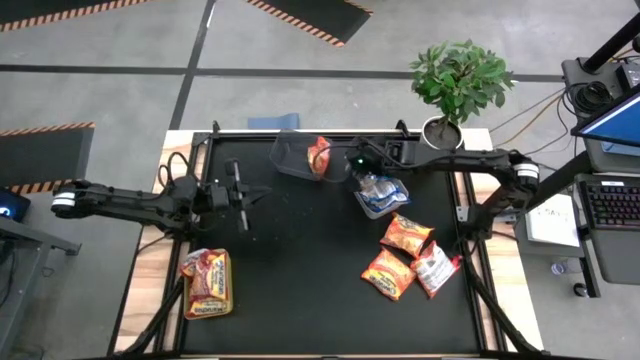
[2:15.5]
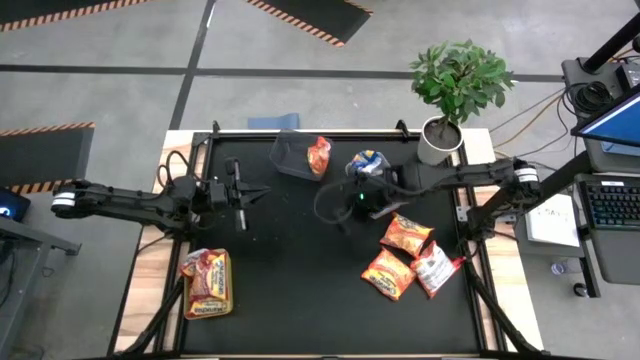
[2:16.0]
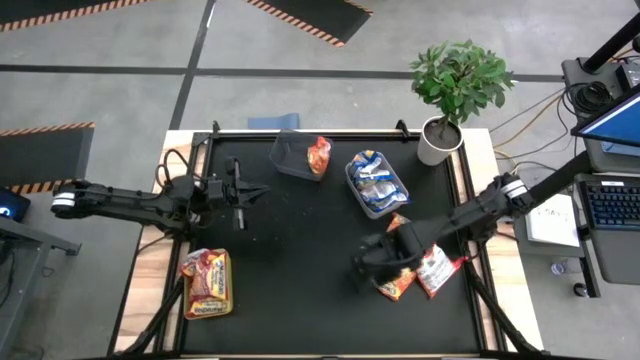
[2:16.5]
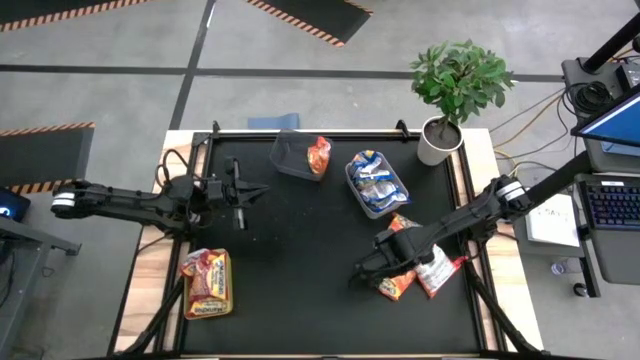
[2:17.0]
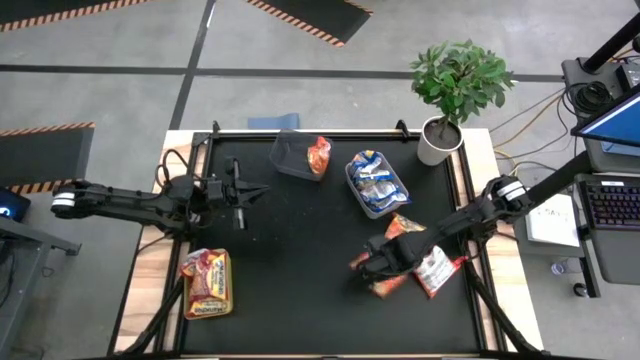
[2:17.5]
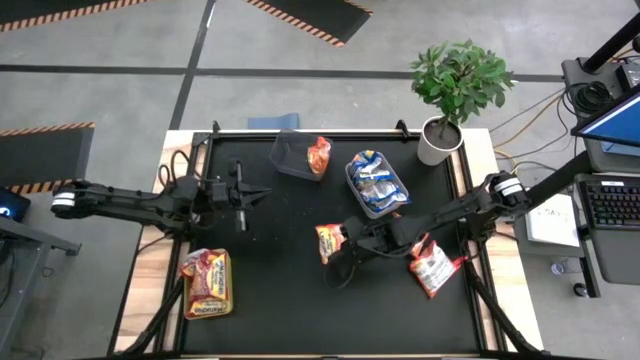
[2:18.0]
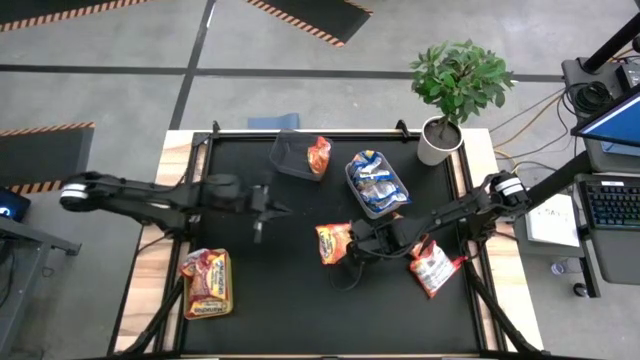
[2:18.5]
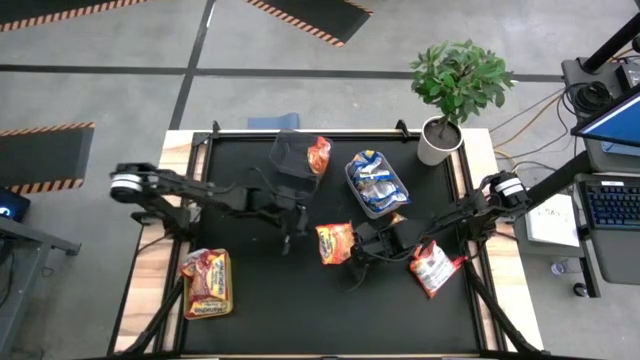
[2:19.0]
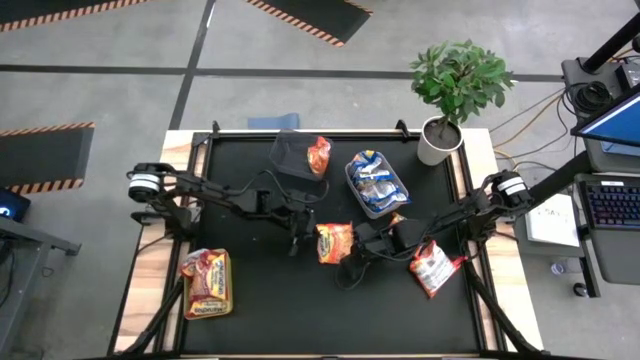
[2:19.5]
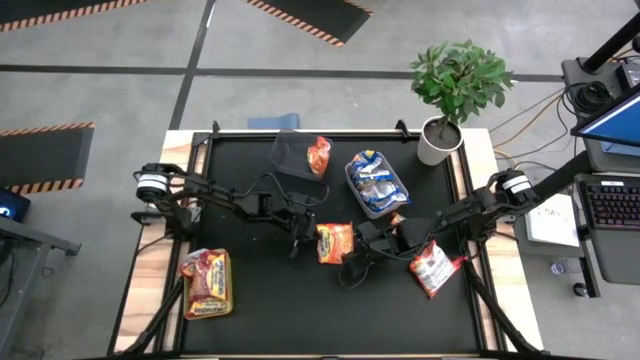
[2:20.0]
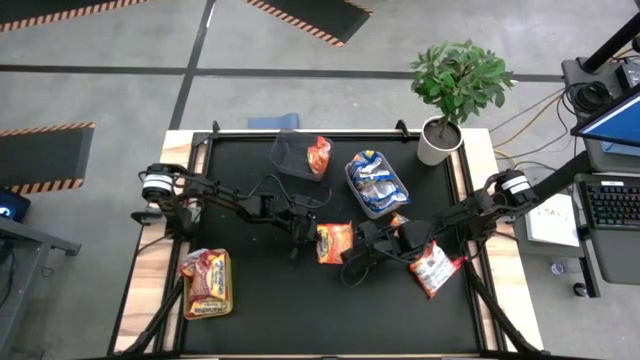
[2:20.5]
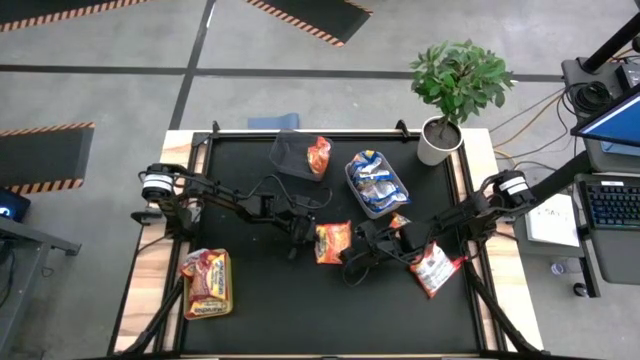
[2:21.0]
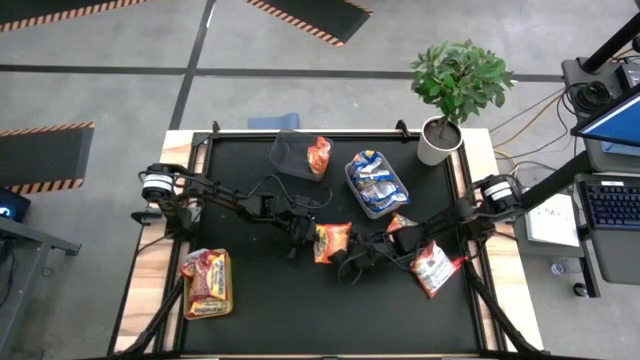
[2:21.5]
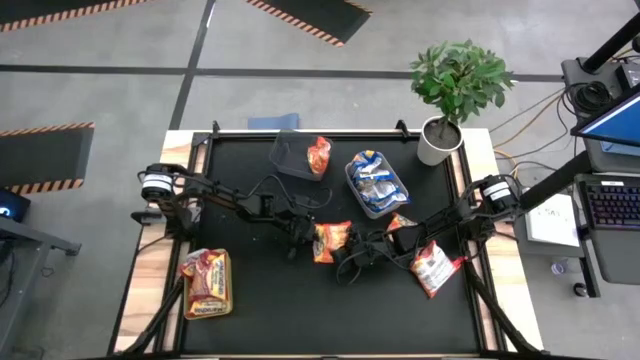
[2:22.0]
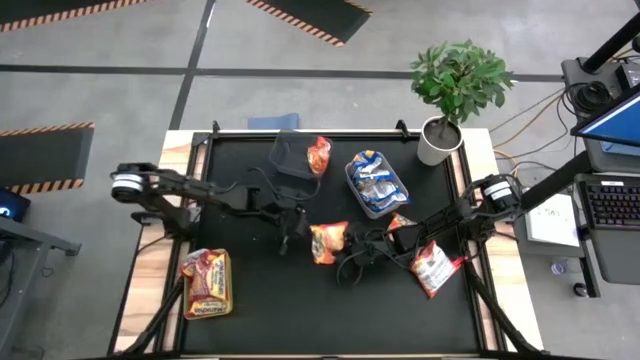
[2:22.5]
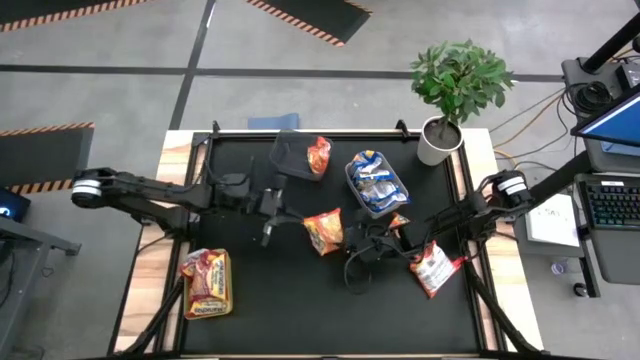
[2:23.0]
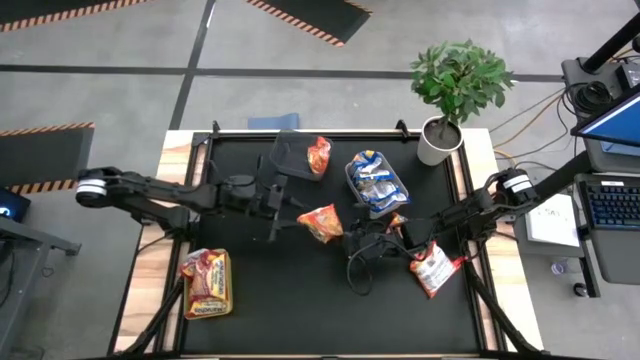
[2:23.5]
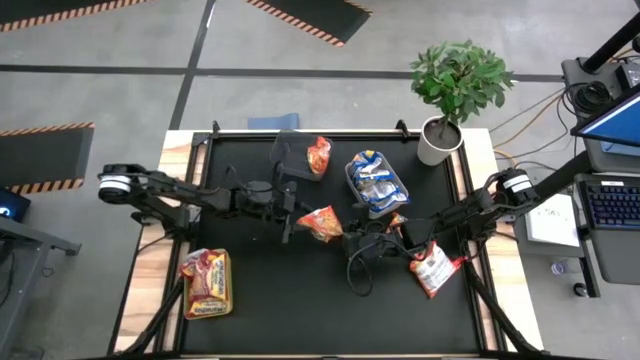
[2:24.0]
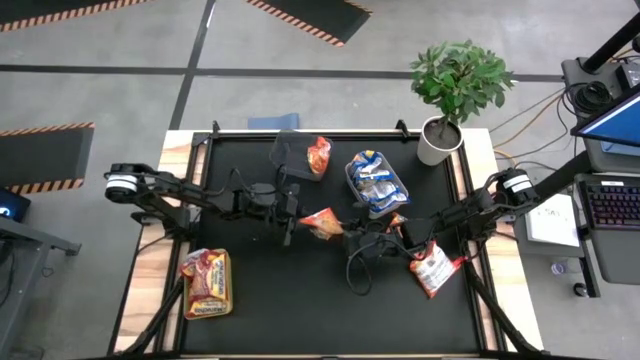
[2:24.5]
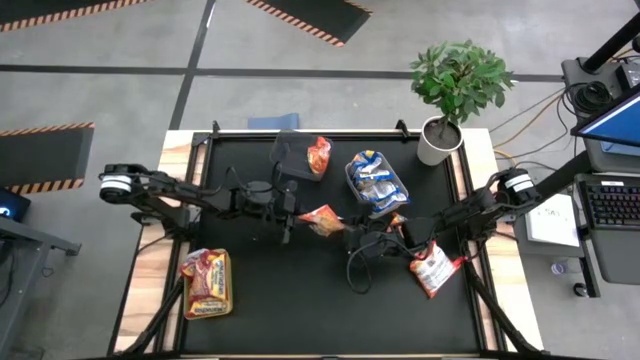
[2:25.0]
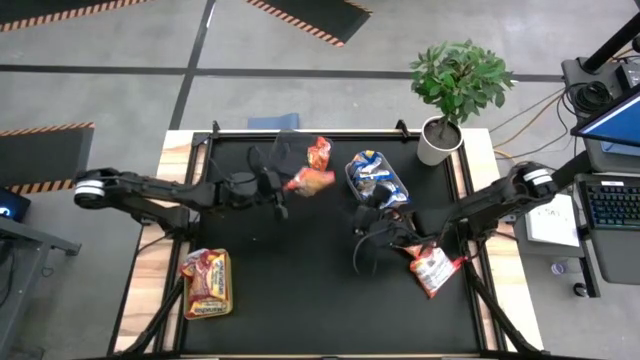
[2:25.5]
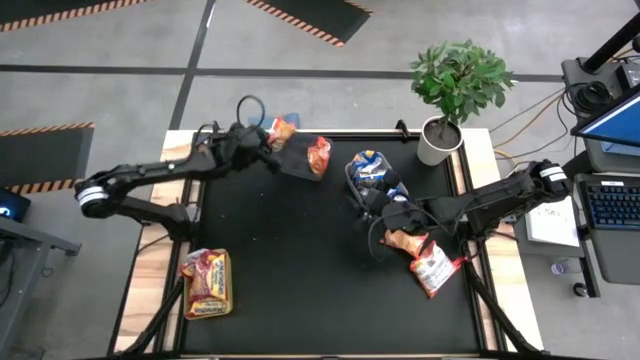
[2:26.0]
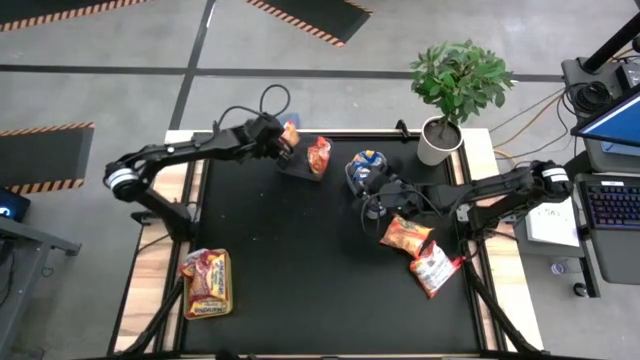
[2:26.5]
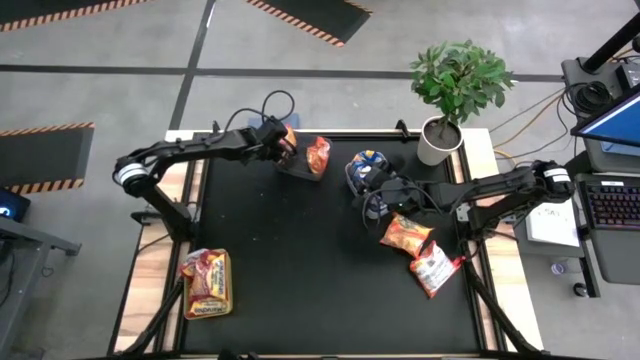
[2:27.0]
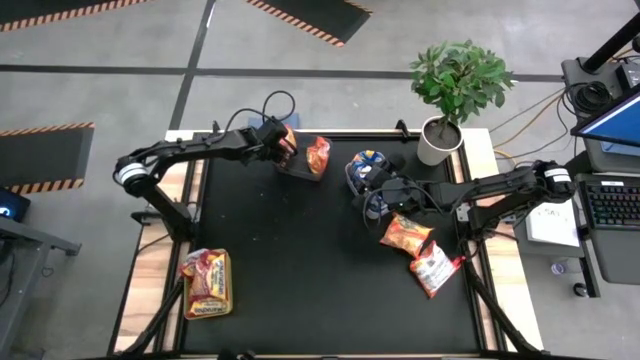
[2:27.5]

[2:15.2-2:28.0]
Task: Sort Maruchan noodles
Put the orange noodle pack into the black bin

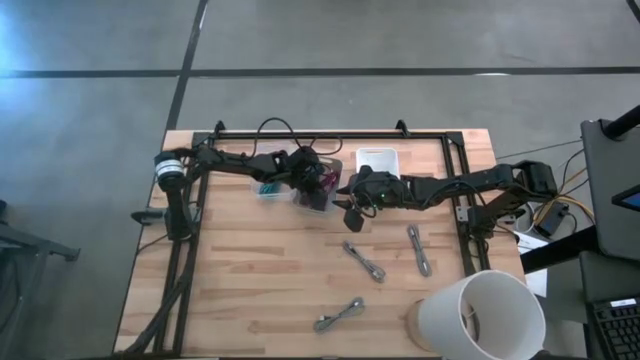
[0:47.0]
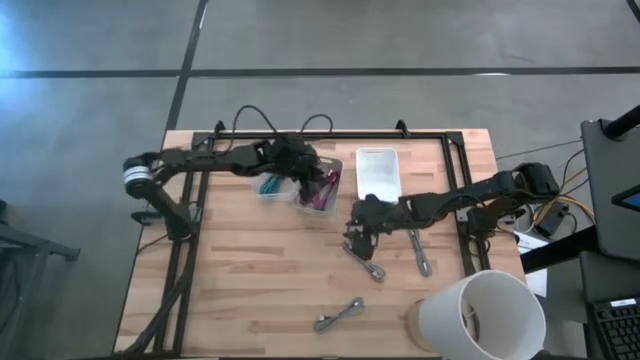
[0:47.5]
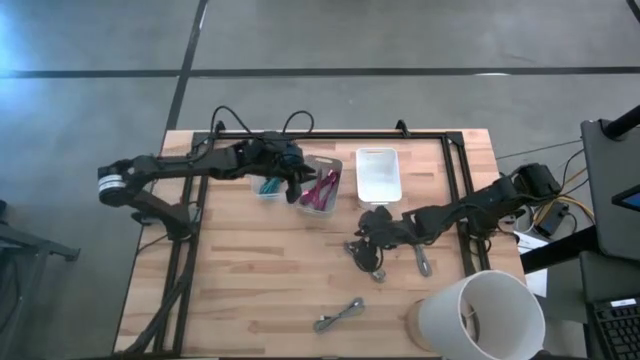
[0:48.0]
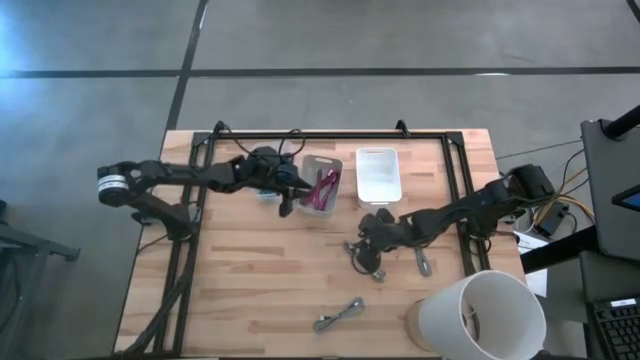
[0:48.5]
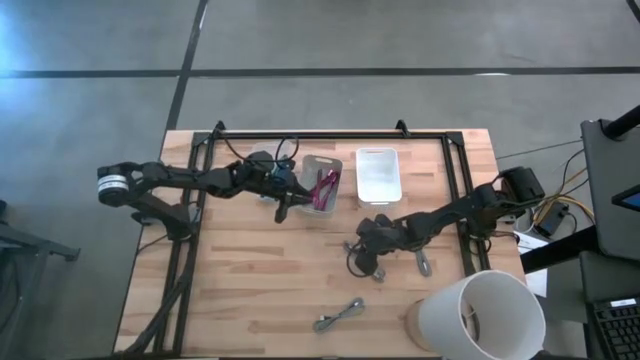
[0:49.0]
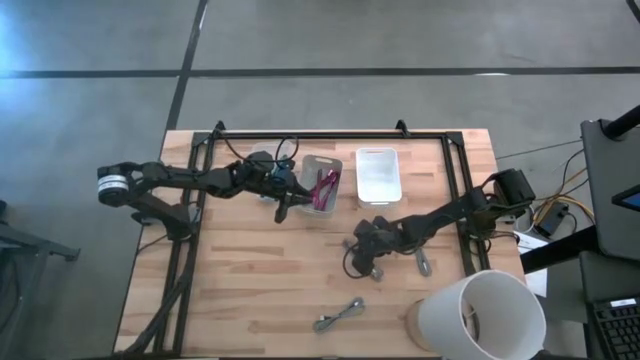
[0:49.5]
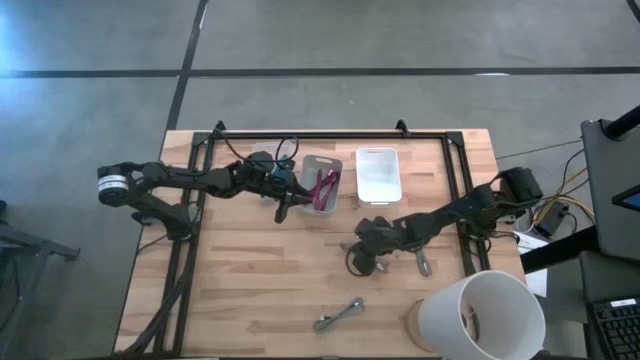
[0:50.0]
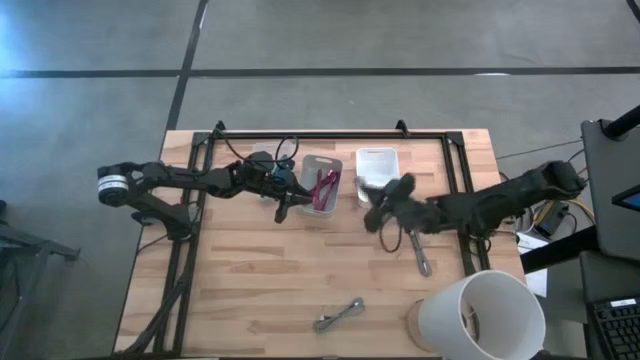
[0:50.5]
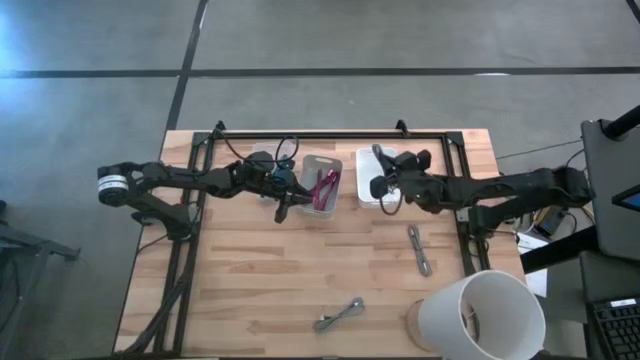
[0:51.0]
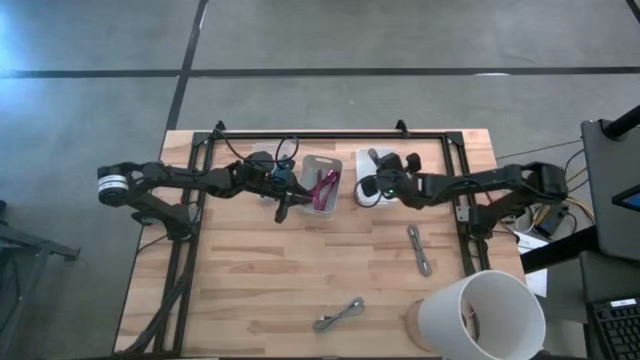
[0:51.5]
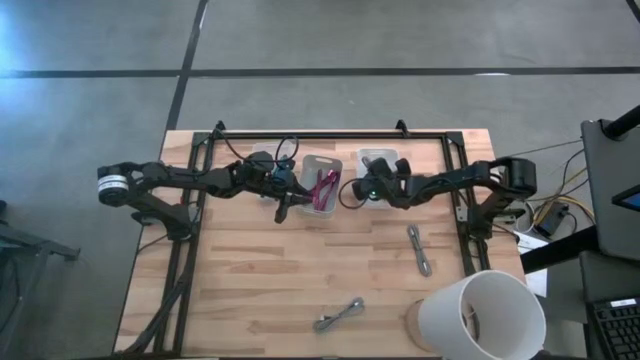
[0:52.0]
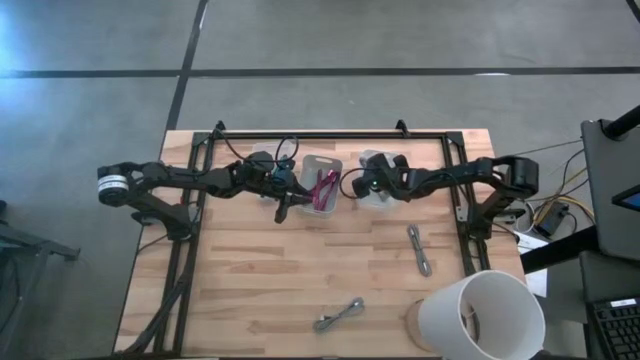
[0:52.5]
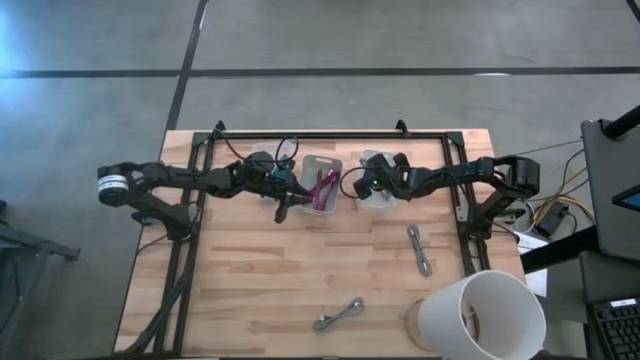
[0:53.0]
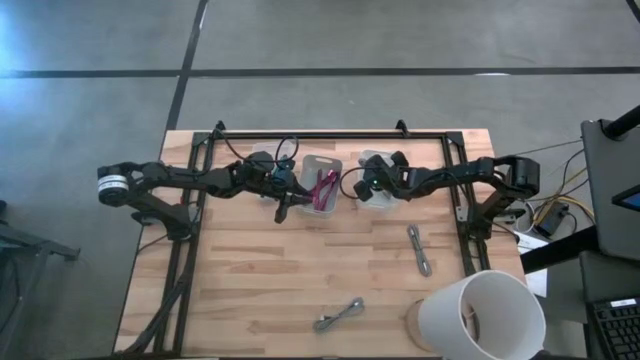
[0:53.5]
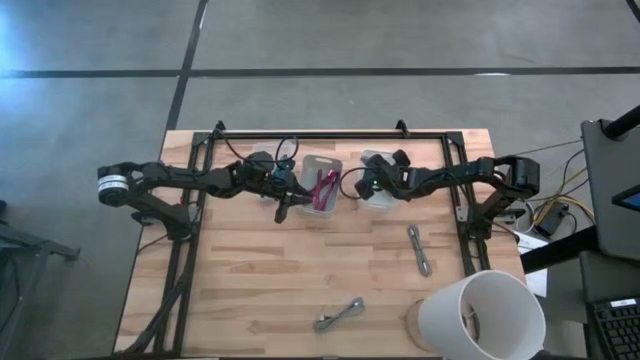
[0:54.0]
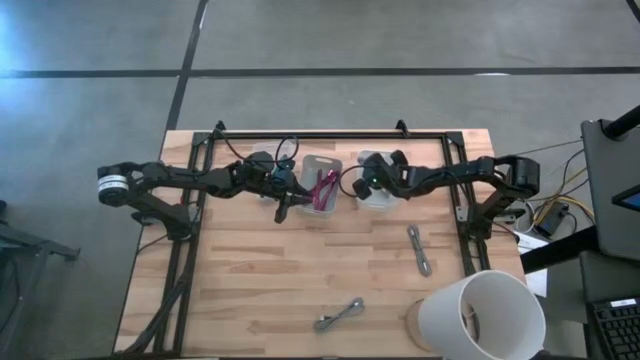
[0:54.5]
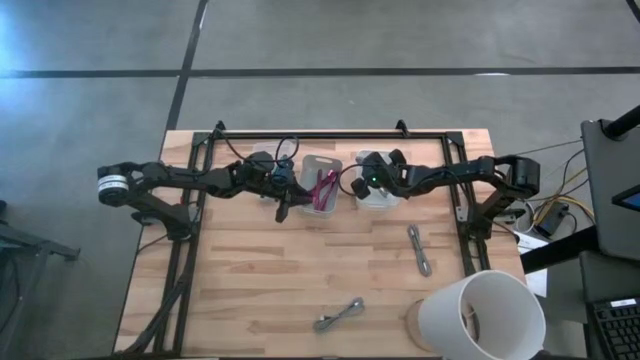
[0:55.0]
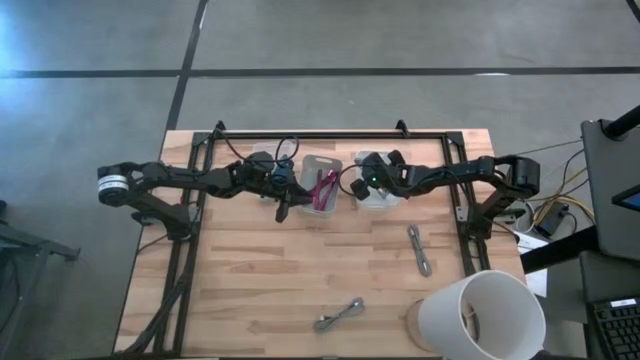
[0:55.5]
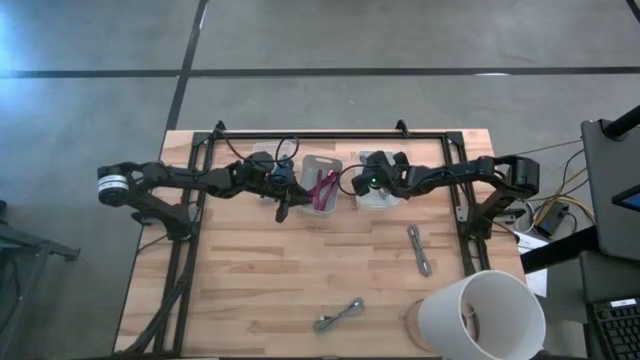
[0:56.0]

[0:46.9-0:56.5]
Task: Pick & Place USB Port
Put the top left white charger cable into the white bin
